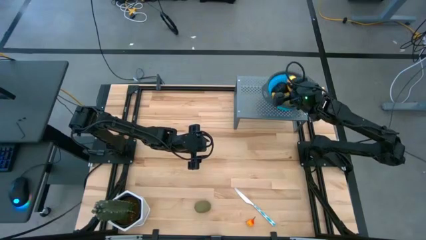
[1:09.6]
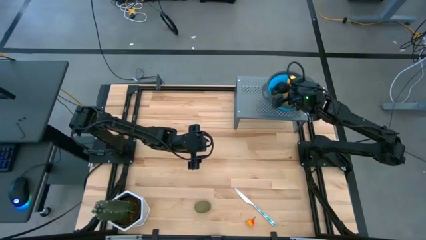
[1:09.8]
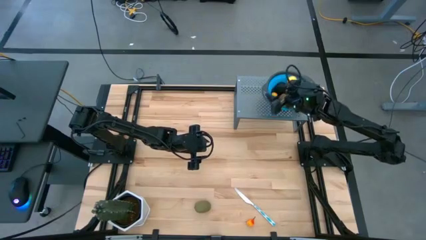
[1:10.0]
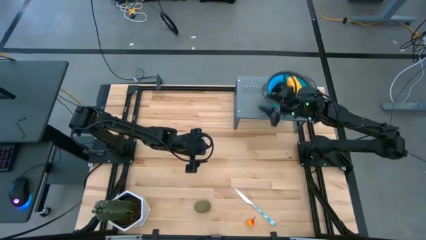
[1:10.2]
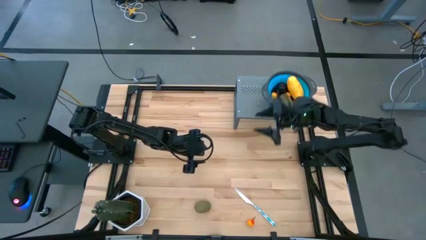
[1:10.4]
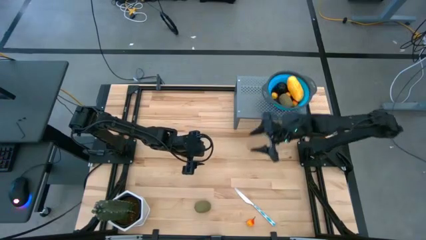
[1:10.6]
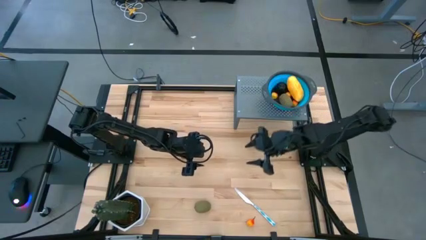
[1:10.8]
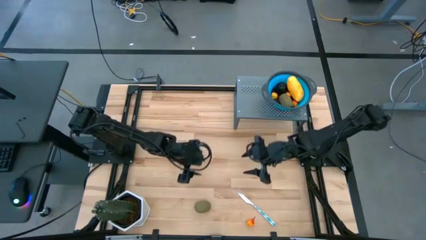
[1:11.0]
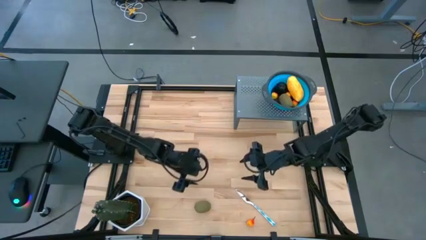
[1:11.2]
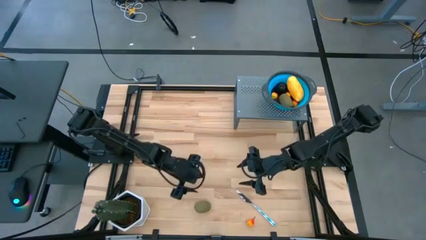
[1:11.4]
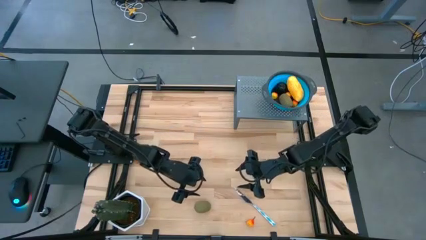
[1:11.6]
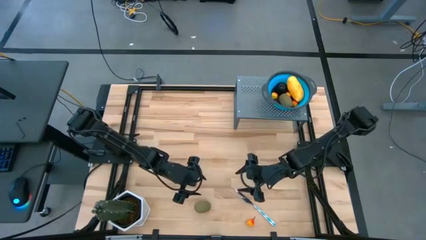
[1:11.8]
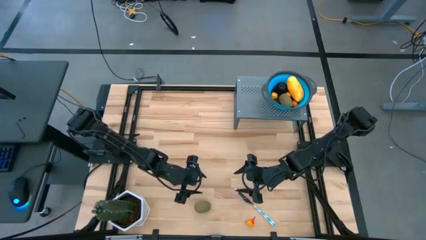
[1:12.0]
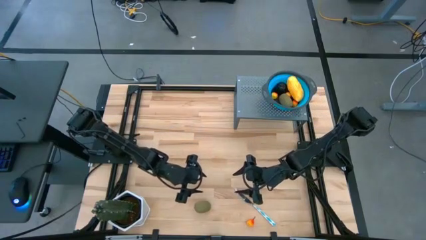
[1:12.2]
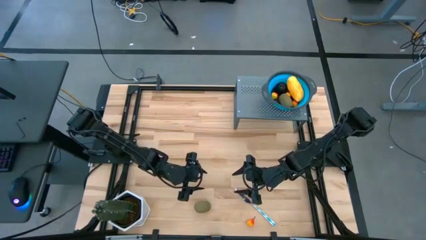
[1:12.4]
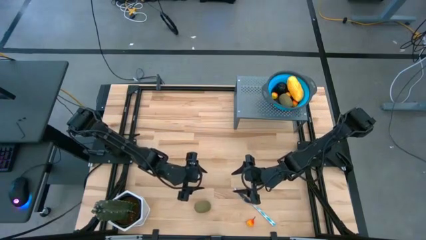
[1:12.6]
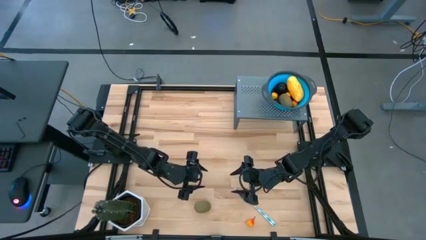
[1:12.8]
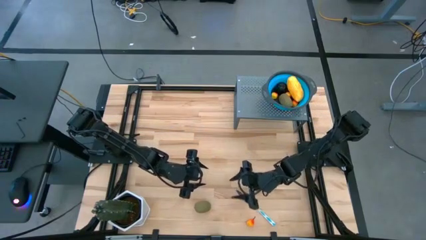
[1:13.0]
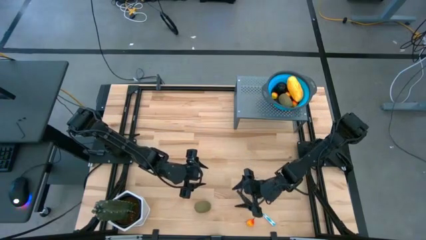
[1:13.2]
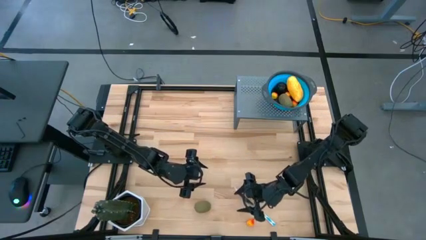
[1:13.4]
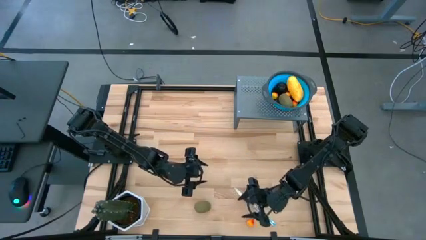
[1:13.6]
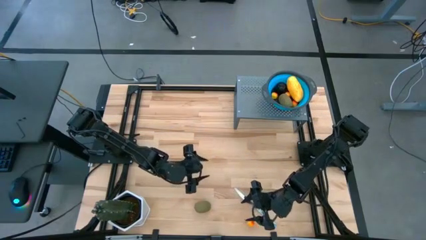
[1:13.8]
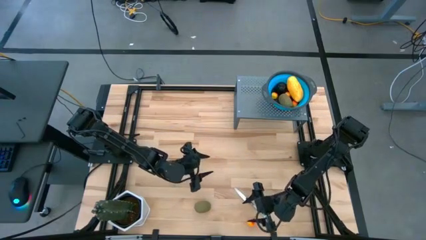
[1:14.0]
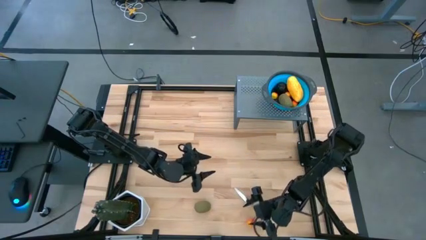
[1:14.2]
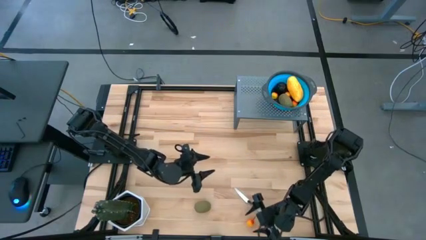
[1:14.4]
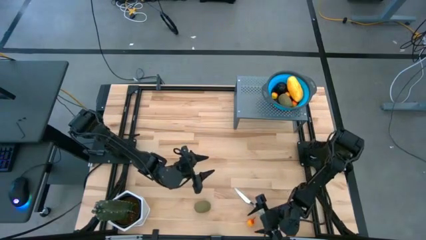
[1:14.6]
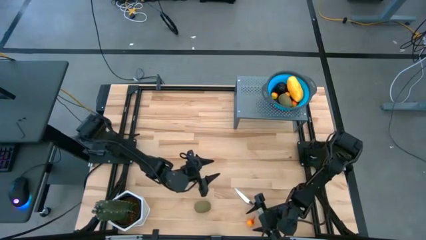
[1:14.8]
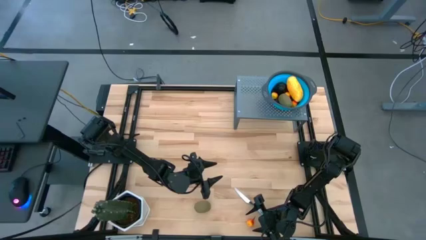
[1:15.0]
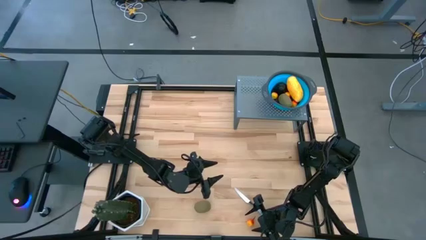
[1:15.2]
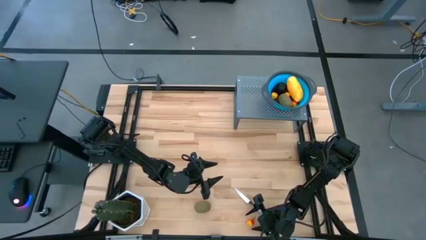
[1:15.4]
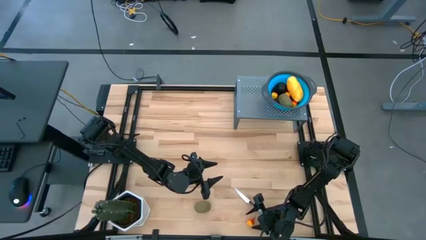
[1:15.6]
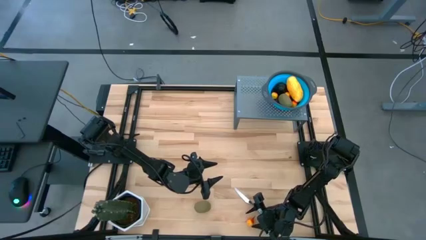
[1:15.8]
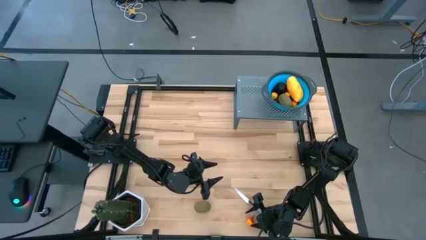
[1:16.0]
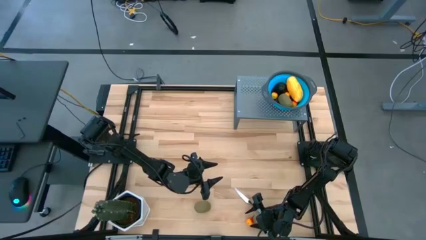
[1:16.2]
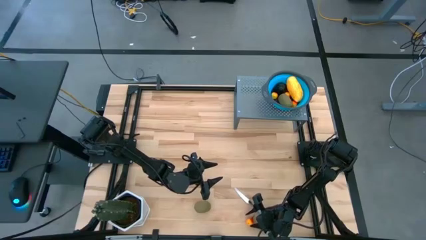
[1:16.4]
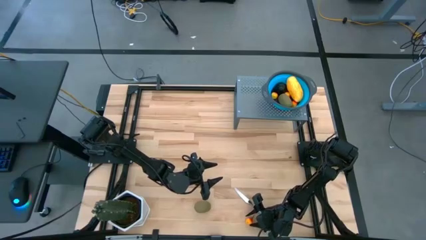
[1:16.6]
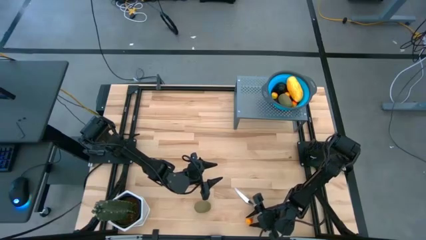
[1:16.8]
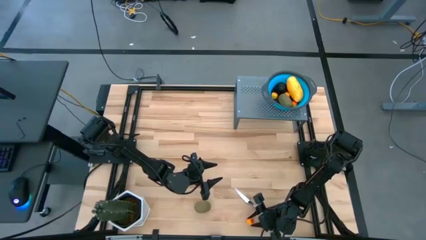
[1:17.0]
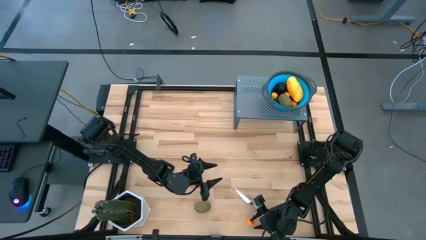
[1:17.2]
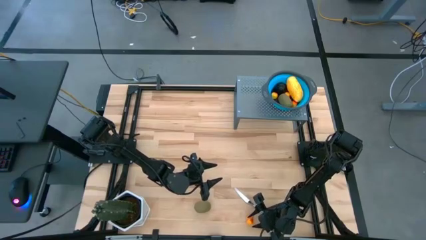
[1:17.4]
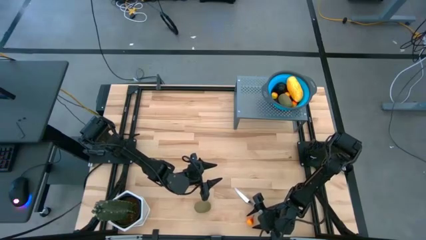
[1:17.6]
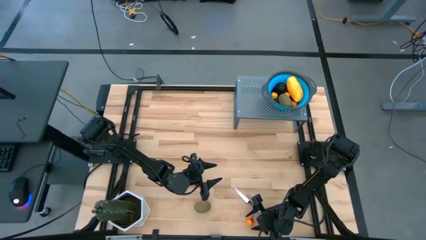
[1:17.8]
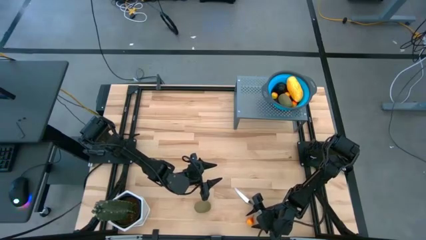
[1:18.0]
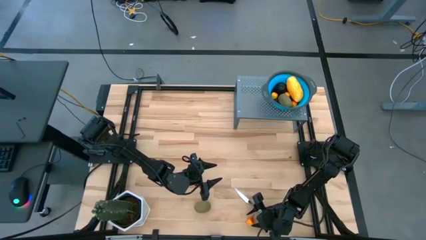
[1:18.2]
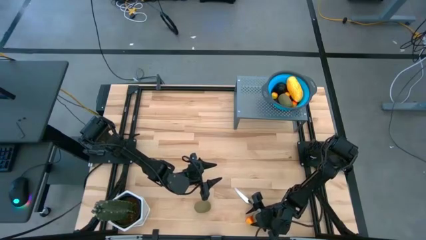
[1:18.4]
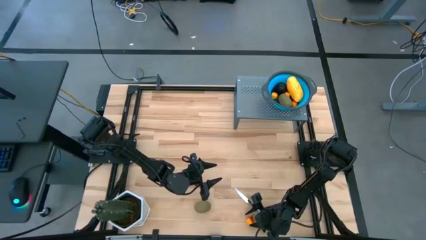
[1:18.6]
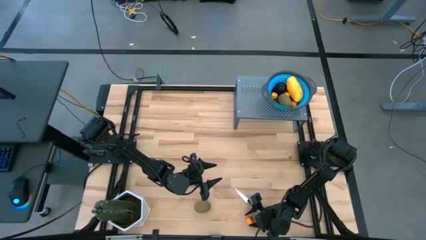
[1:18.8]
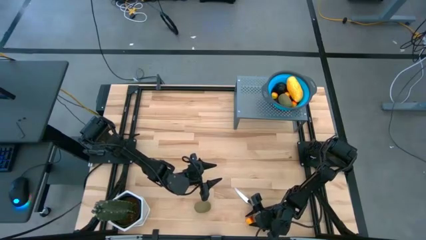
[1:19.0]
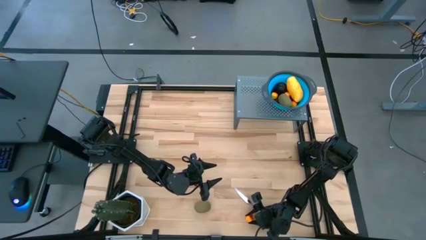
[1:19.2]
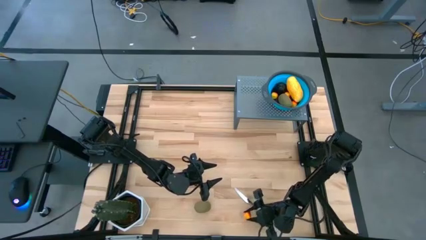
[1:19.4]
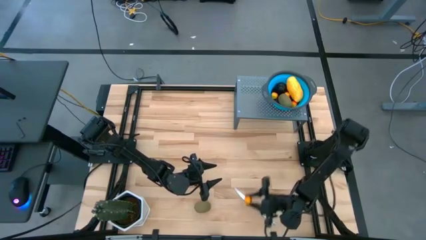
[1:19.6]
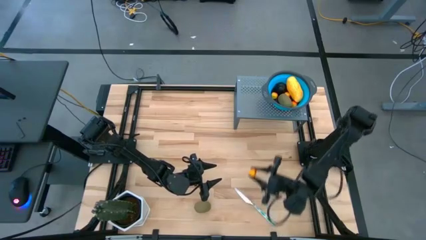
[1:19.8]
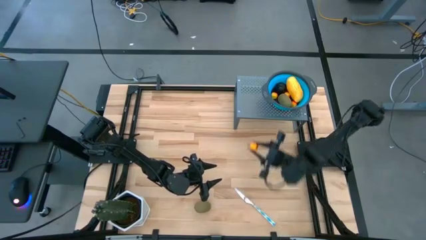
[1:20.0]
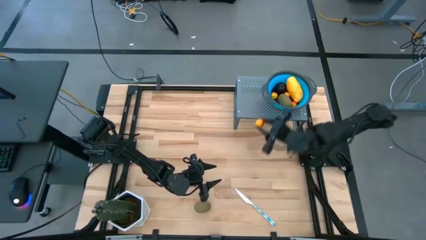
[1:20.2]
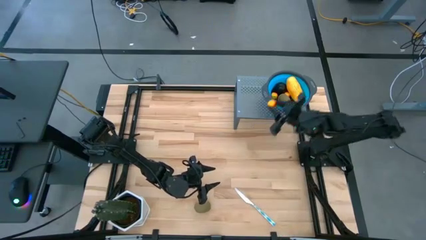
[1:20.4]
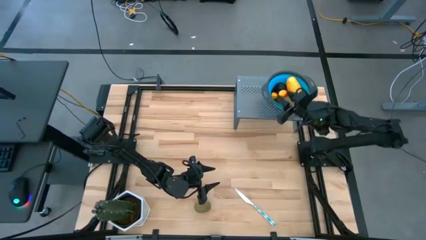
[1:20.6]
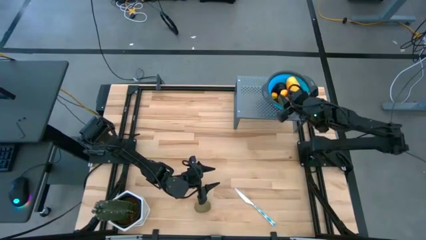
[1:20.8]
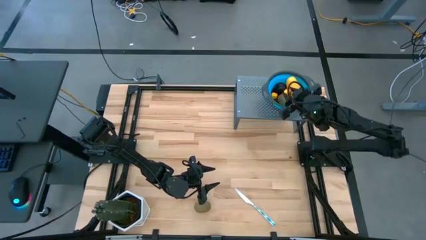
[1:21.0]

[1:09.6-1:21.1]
Task: Pick & Place Fruit
Put the yellow peach into the blue strainer bowl on the shelf
